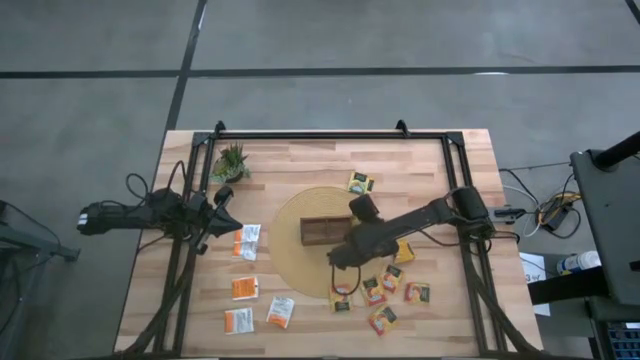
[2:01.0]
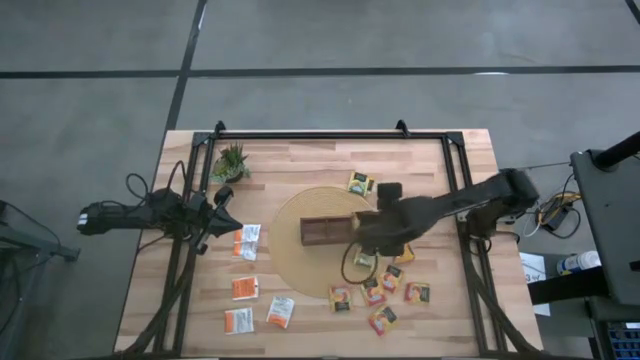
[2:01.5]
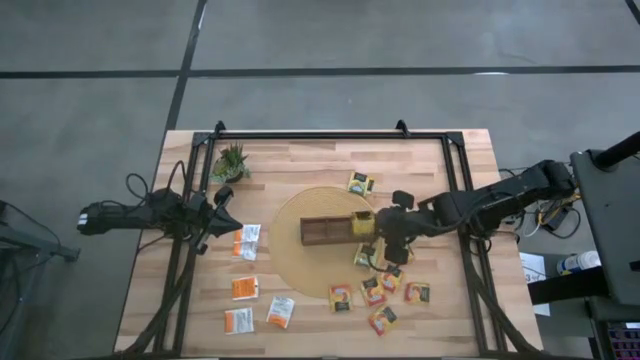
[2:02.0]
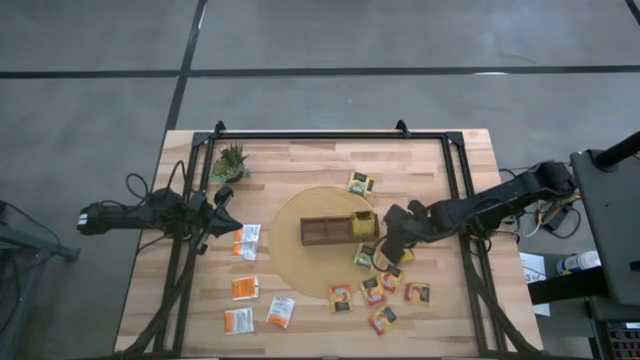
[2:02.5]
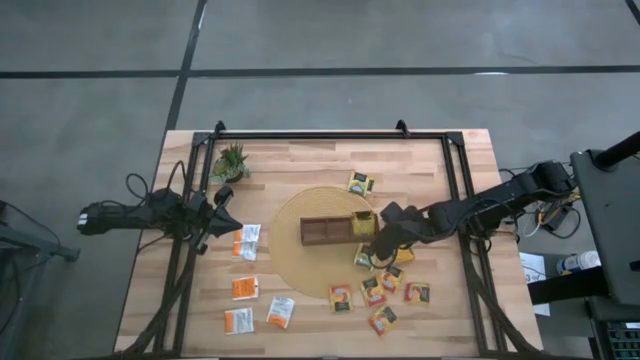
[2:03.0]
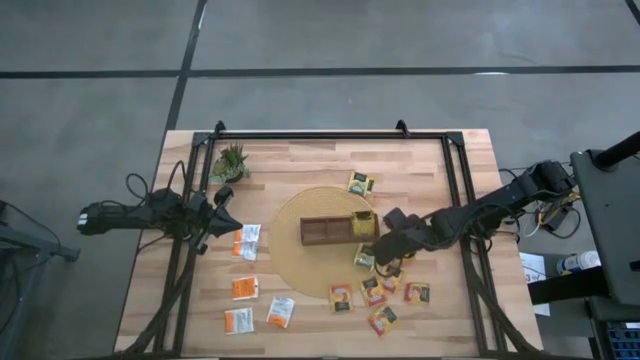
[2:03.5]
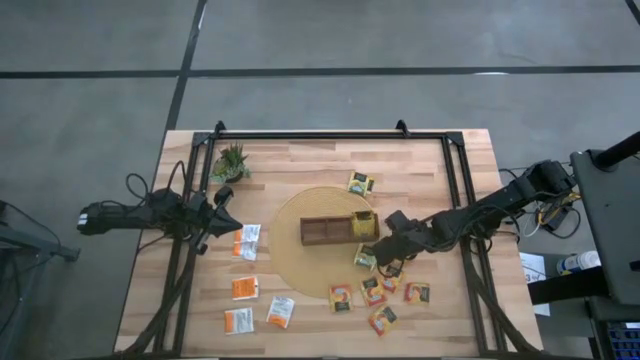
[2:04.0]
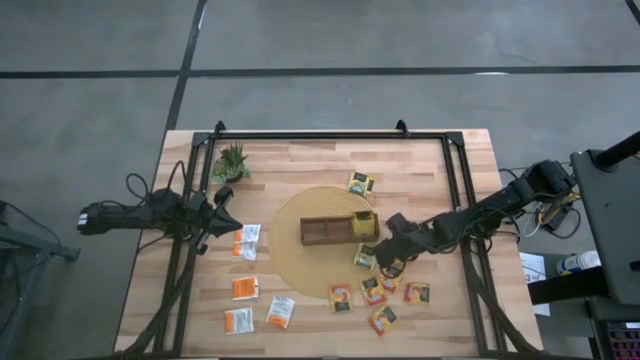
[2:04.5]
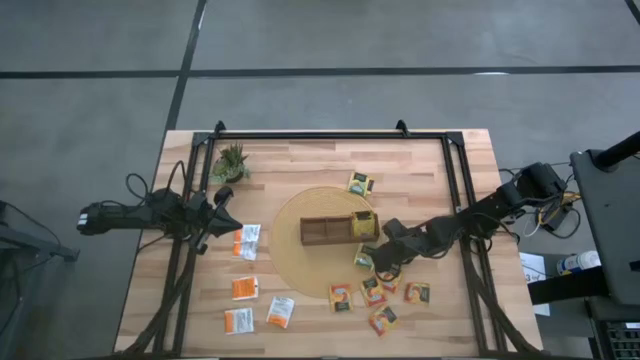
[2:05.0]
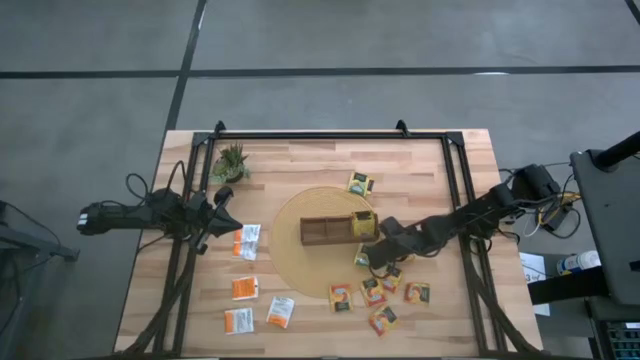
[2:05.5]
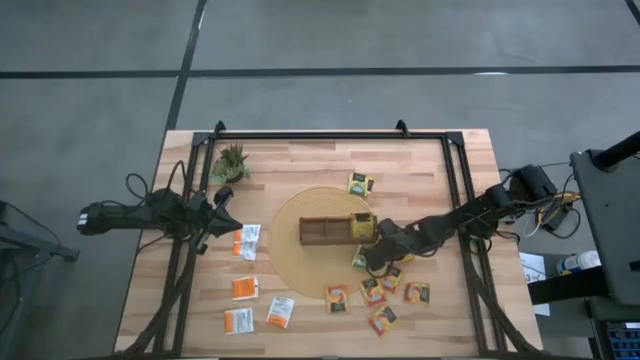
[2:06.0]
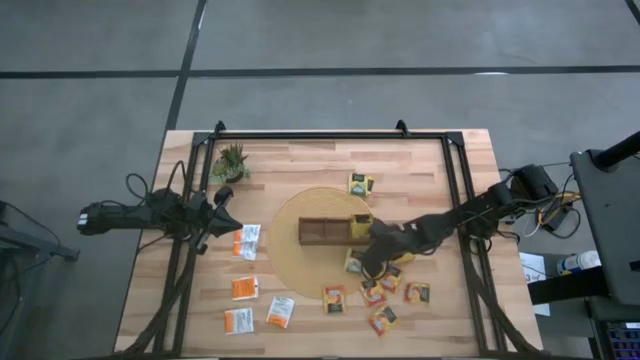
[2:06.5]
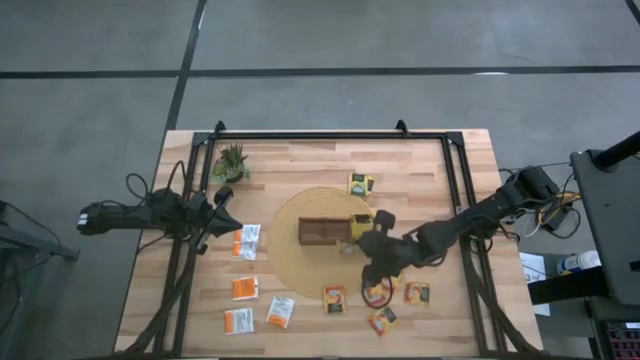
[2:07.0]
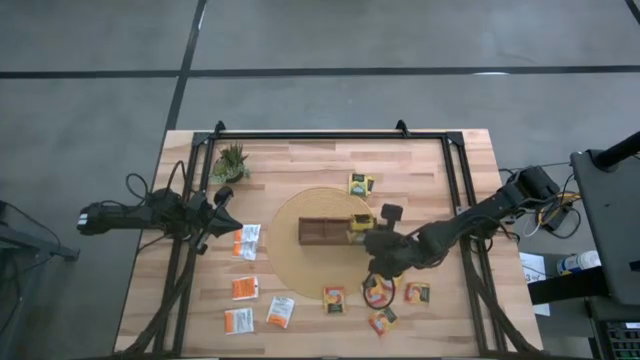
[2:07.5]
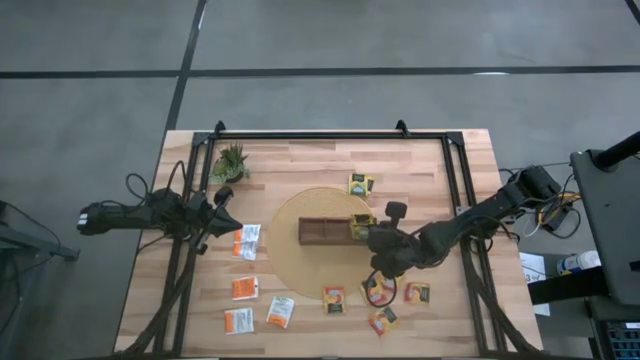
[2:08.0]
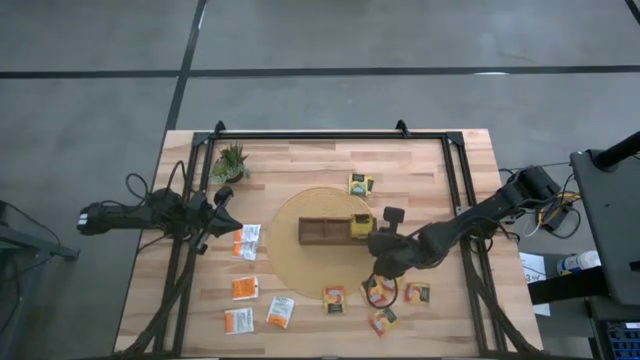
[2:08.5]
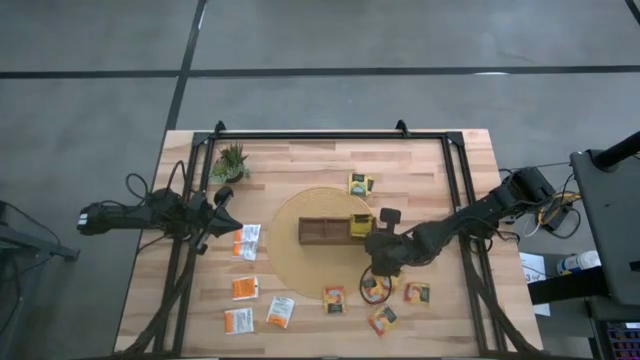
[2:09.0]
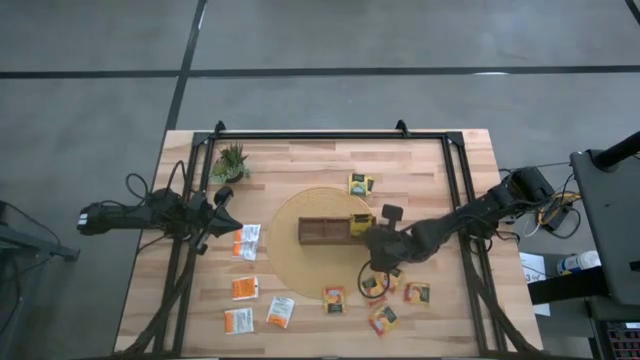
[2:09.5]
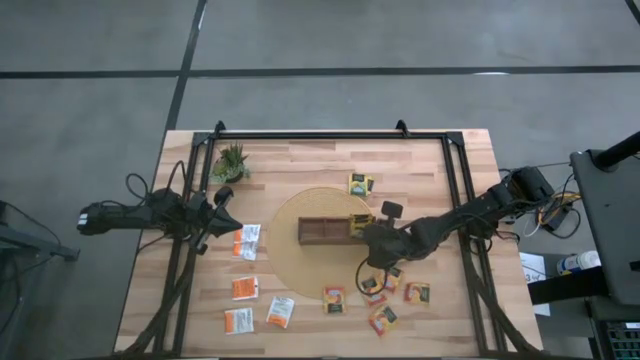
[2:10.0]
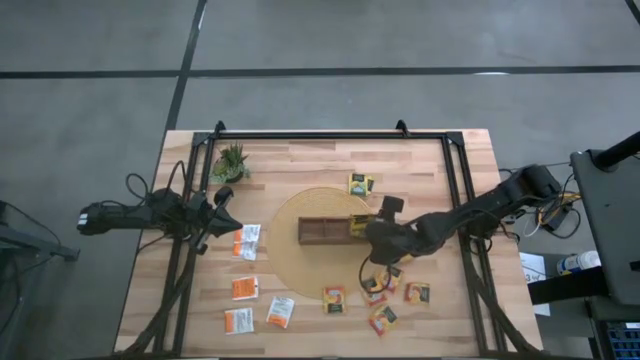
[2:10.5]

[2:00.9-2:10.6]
Task: Pick & Place Tea
Put the right yellow tea bag into the right of the wooden organizer

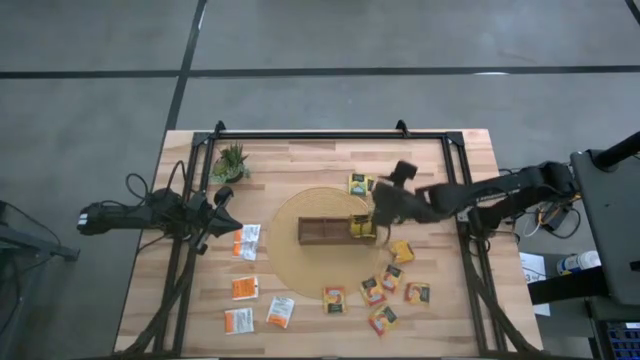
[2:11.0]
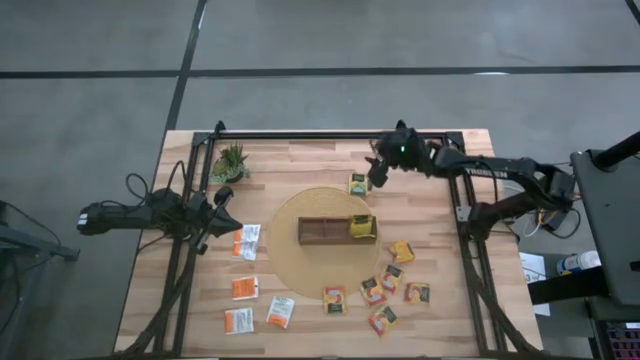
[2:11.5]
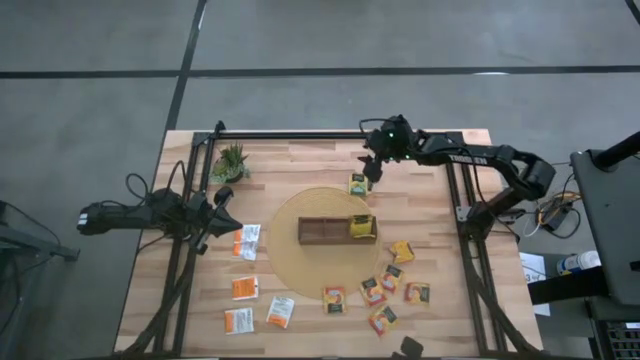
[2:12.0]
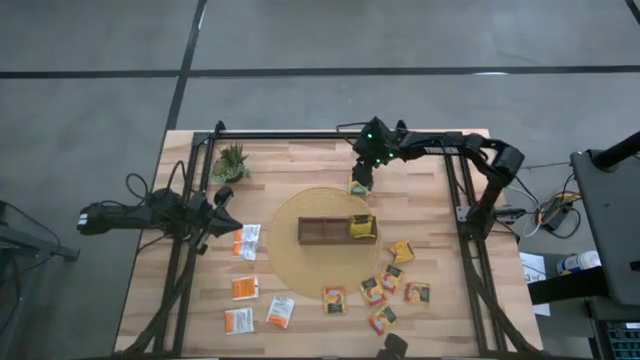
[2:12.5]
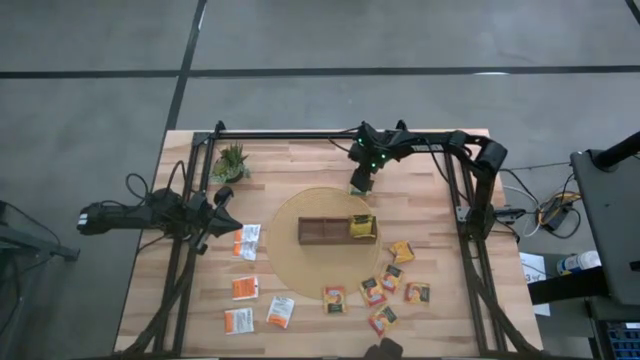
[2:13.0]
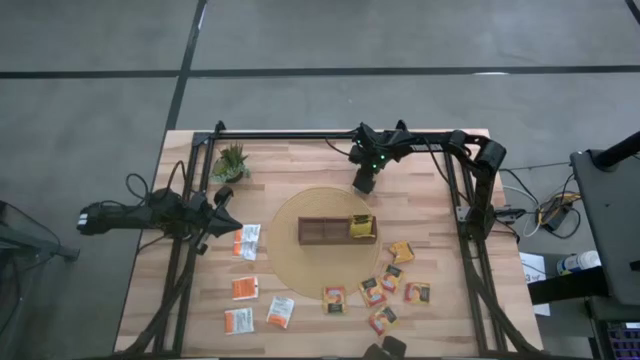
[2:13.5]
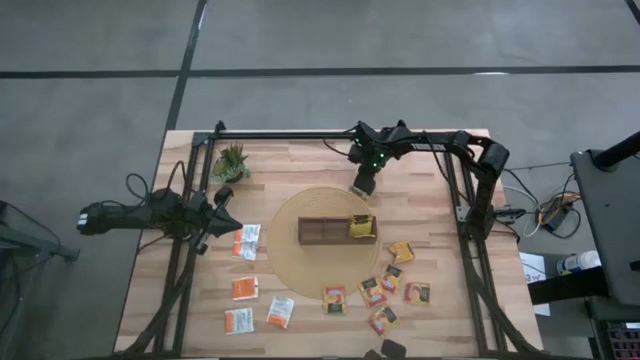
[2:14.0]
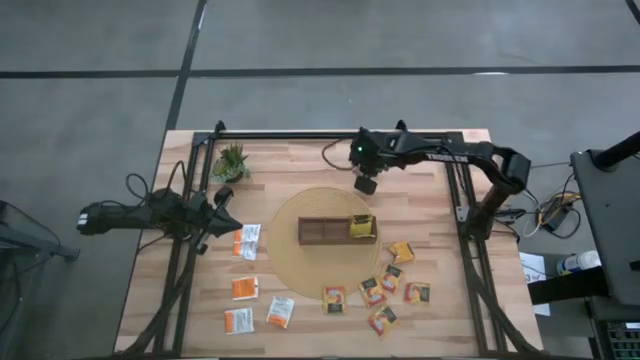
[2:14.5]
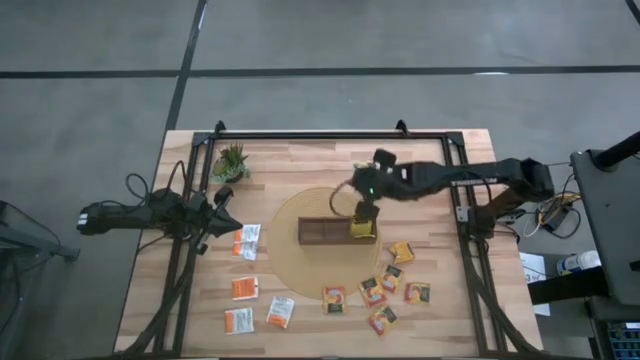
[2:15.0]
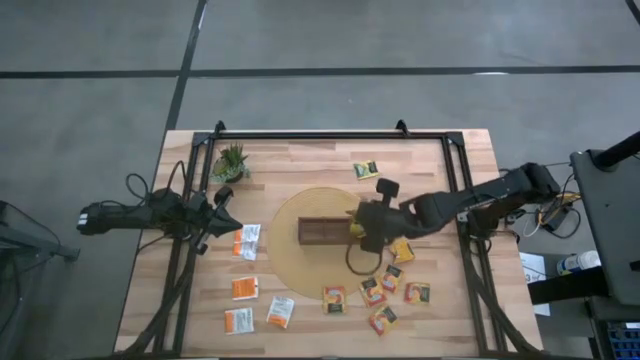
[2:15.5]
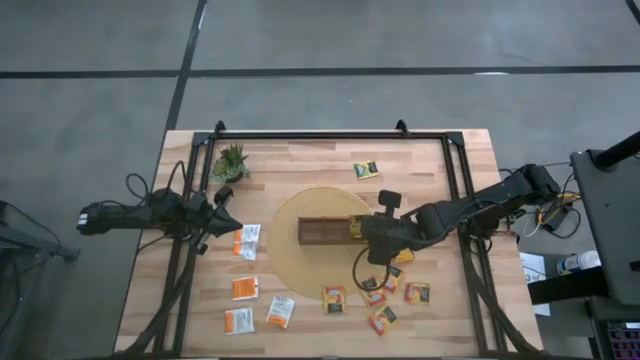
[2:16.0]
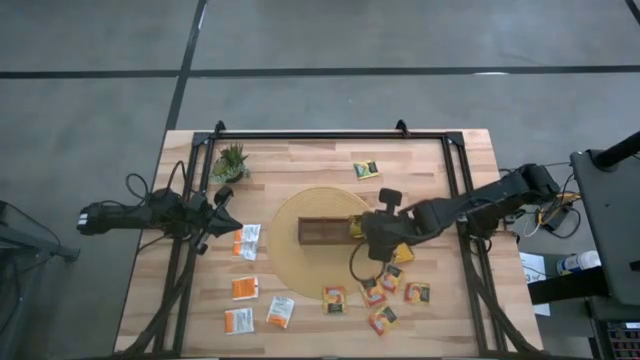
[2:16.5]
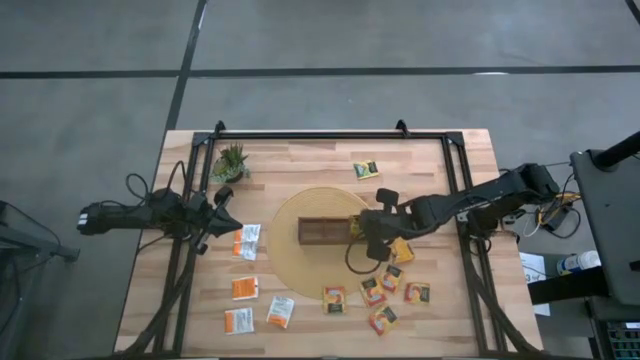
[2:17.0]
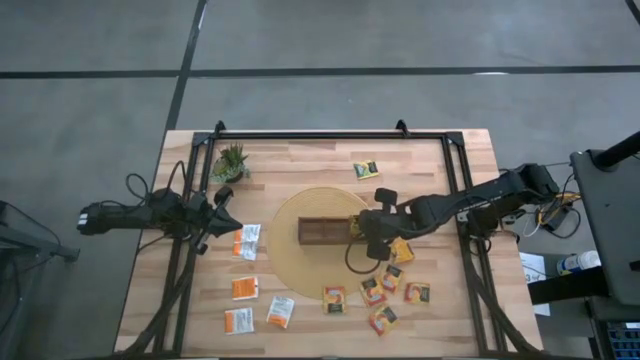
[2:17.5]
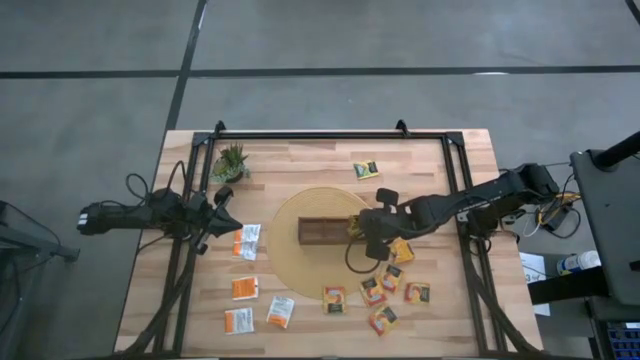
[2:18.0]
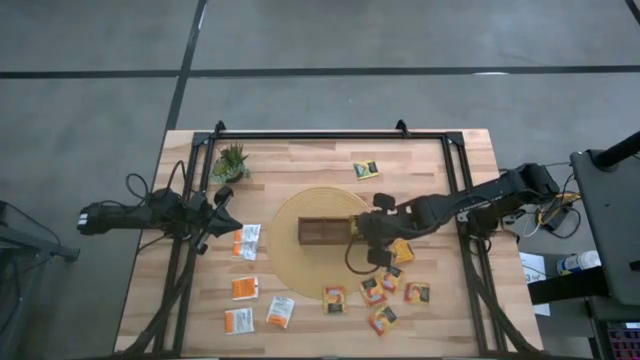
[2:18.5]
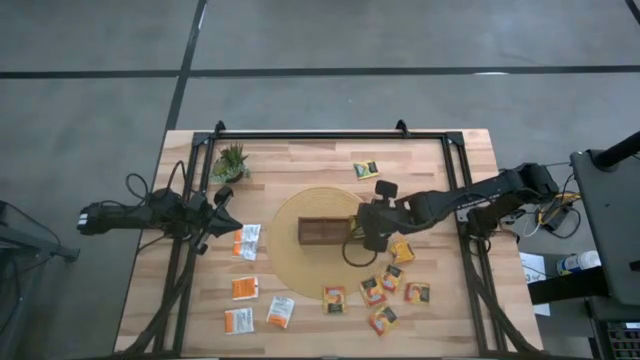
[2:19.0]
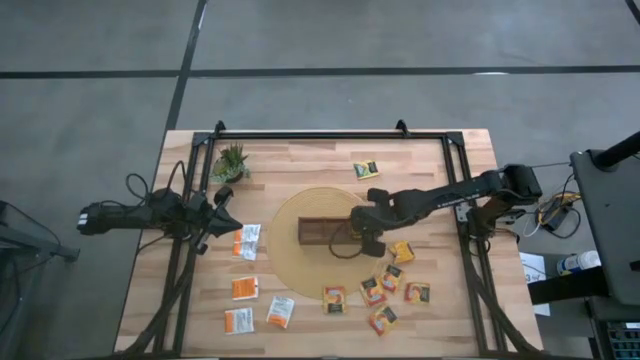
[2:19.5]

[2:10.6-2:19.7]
Put the top yellow tea bag into the right of the wooden organizer

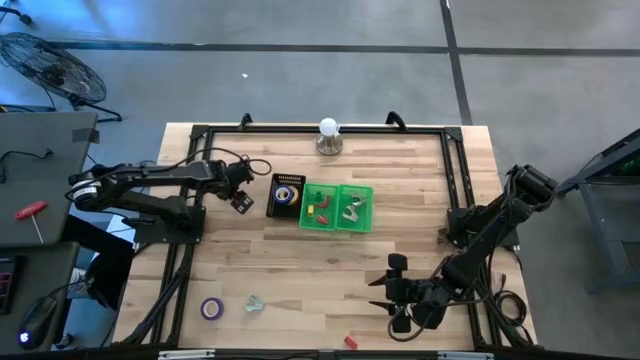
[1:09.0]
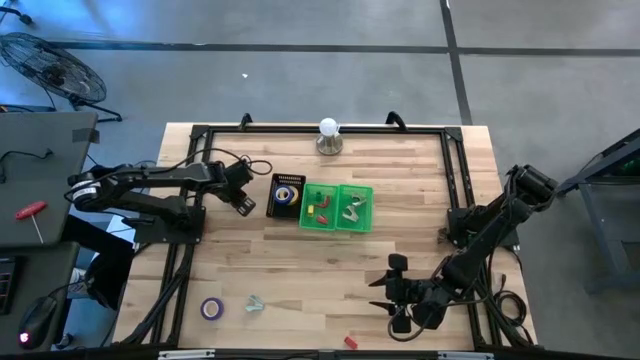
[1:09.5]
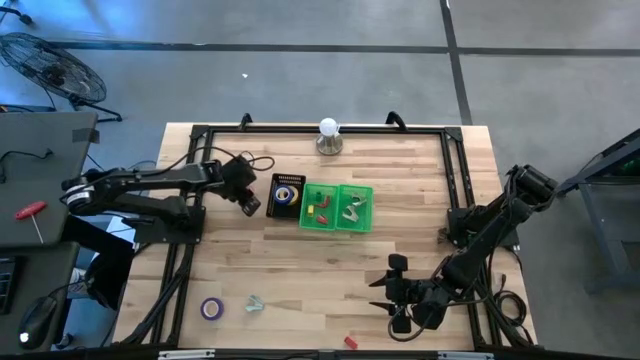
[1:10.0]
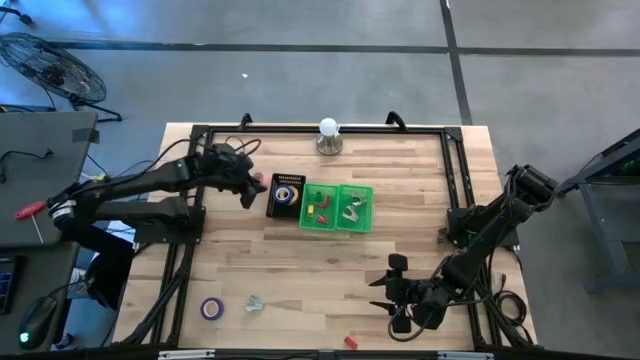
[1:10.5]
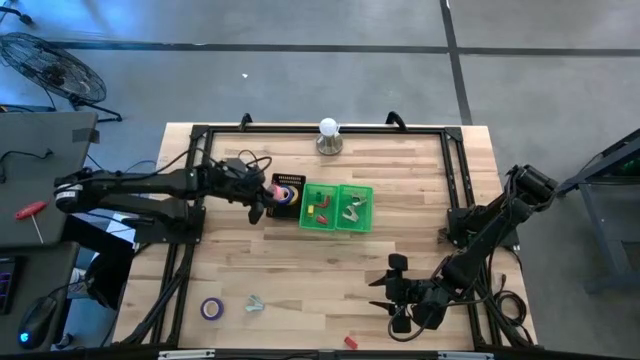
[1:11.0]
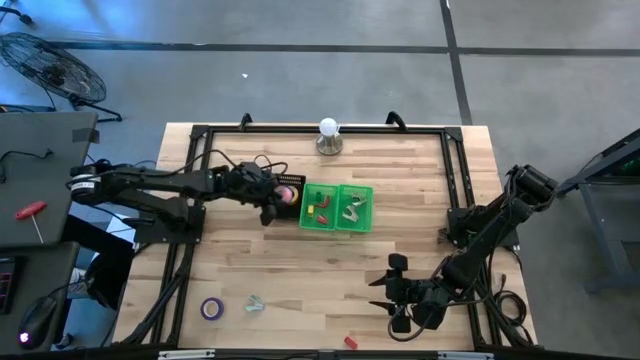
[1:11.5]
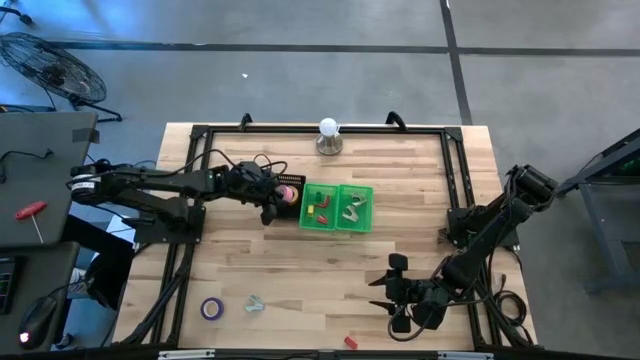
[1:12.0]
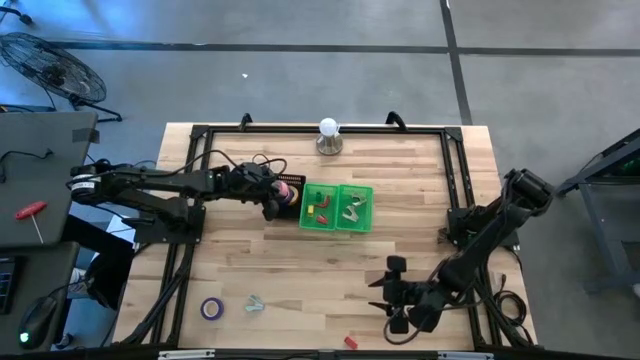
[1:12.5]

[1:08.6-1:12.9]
Task: Pick and place Stapler, Stapler remover, tape
Put the pink tape into the black bin
